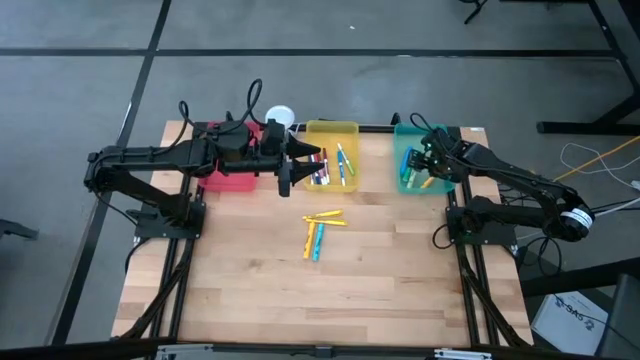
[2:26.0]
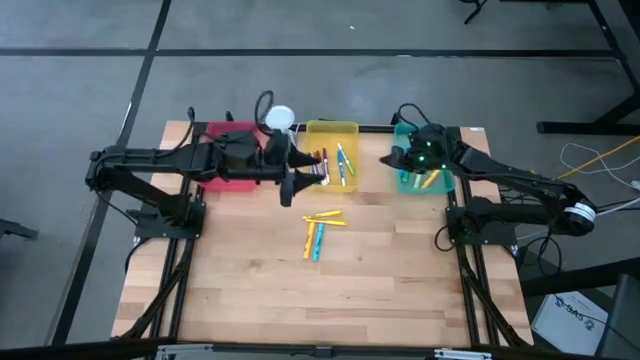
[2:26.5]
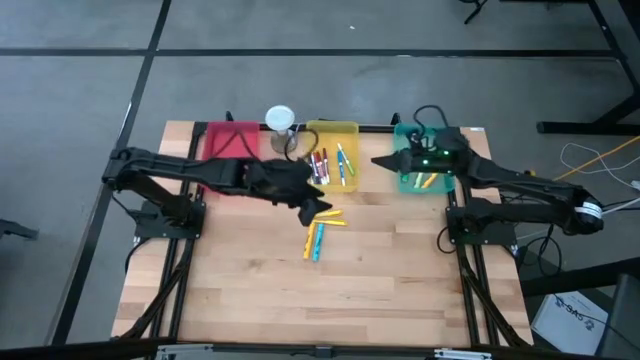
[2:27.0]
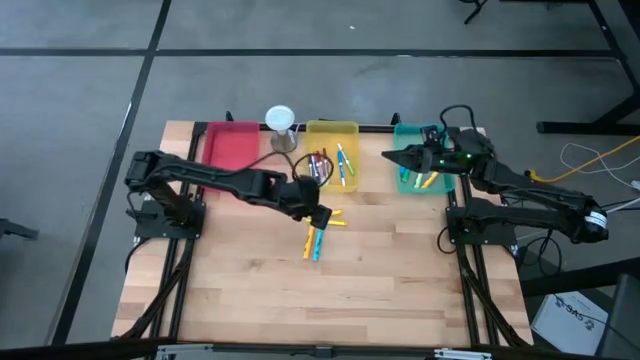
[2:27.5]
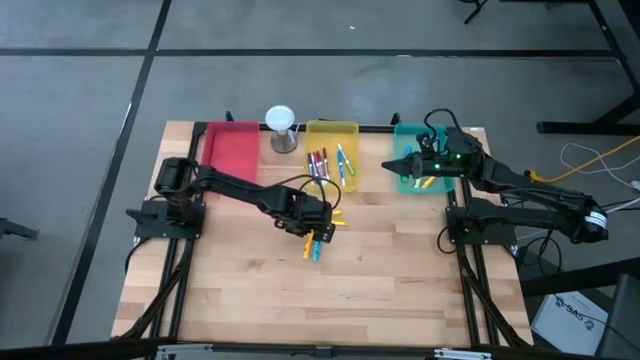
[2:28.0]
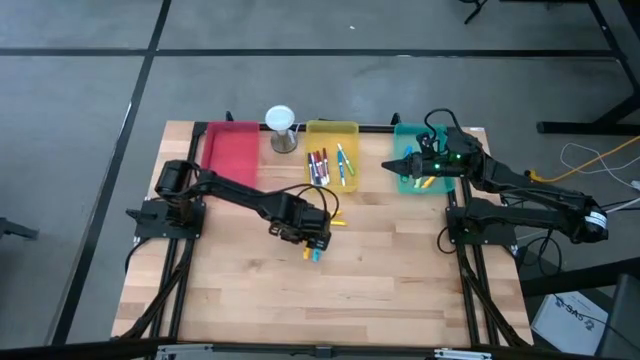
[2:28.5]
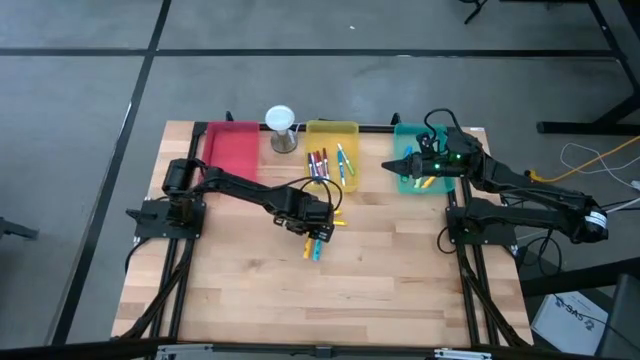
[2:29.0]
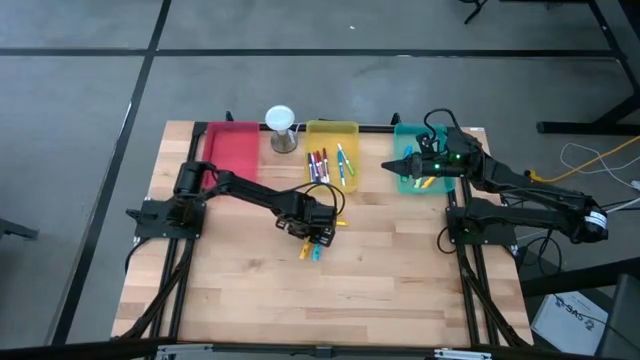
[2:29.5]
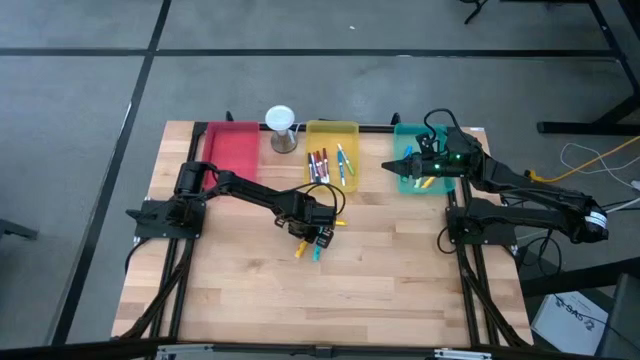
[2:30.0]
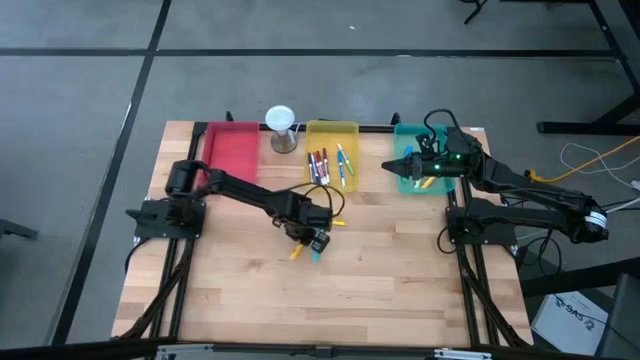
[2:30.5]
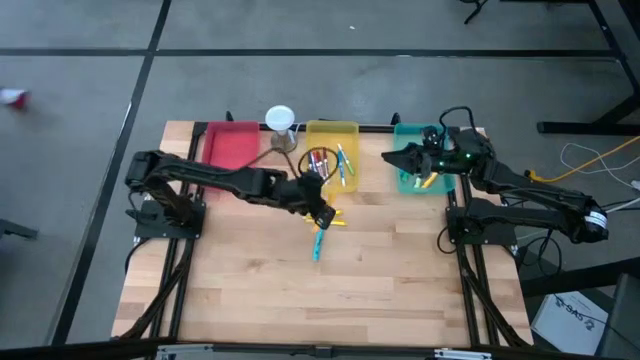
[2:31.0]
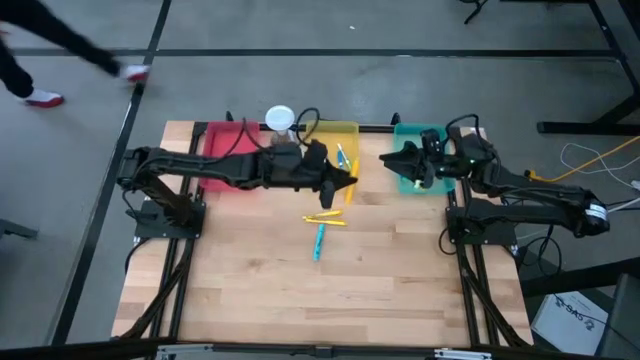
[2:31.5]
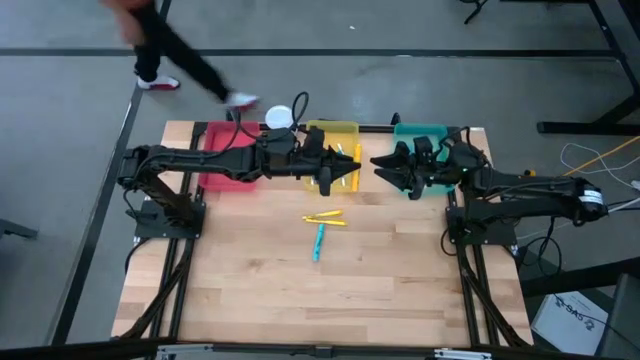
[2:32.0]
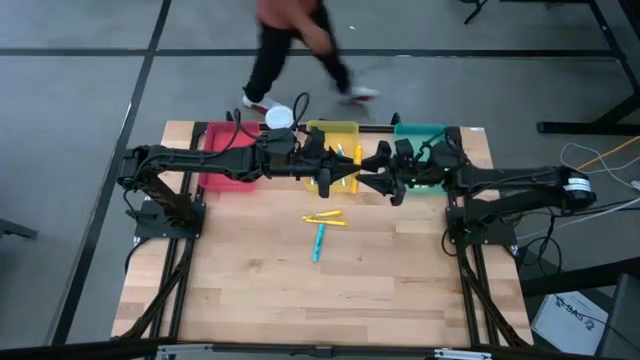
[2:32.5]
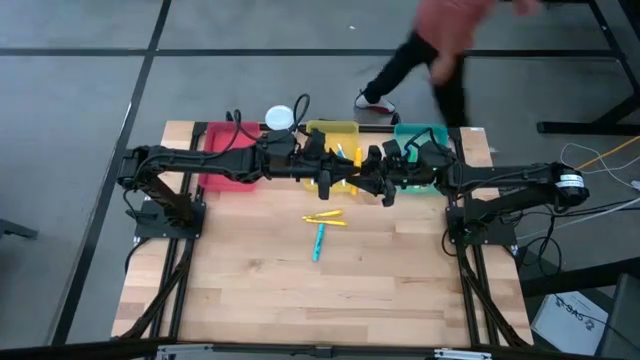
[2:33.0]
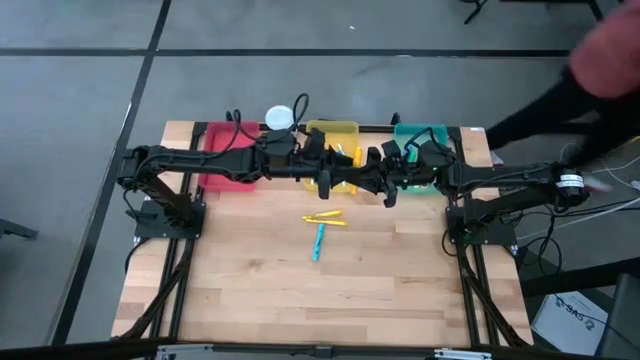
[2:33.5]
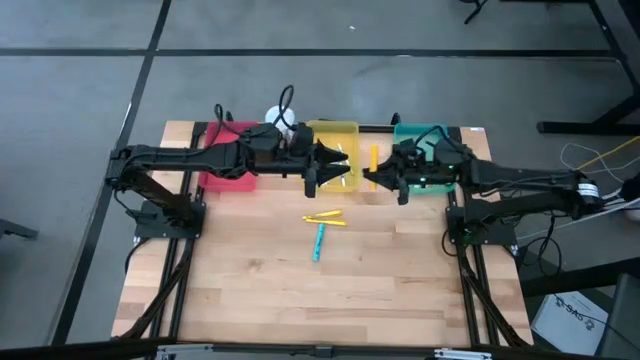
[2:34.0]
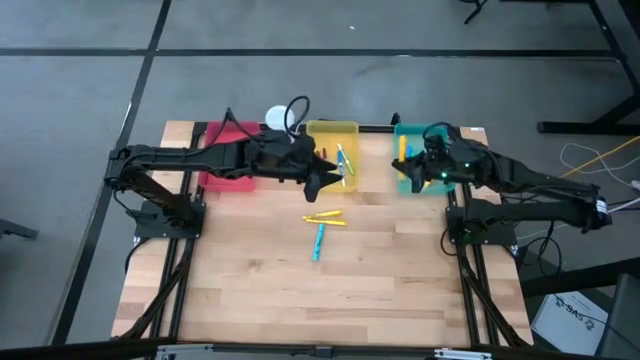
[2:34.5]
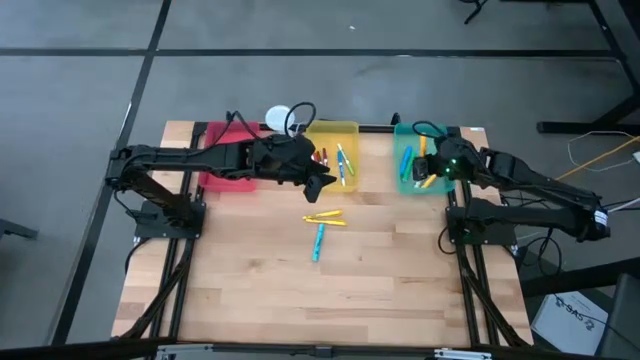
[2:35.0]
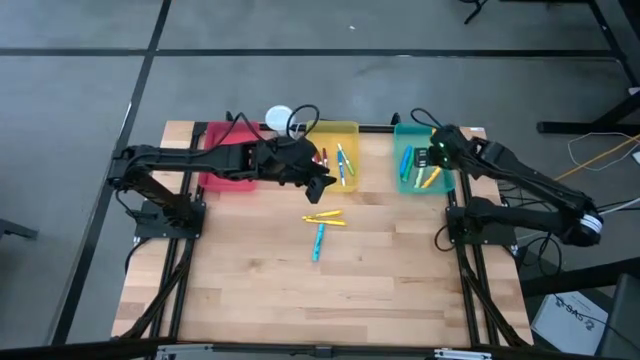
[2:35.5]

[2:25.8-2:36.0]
Task: Pick & Place Markers
Put the yellow highlighter into the blue bin

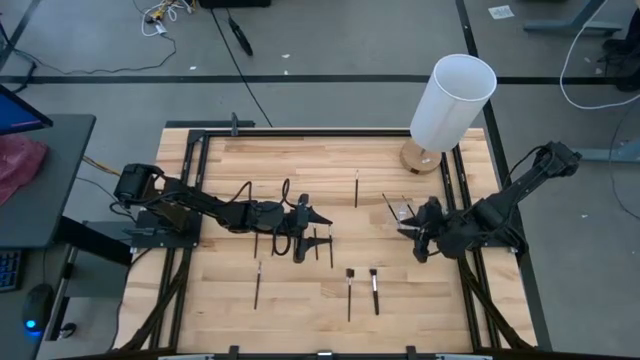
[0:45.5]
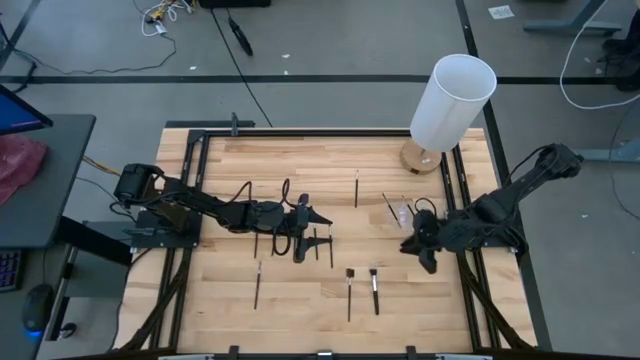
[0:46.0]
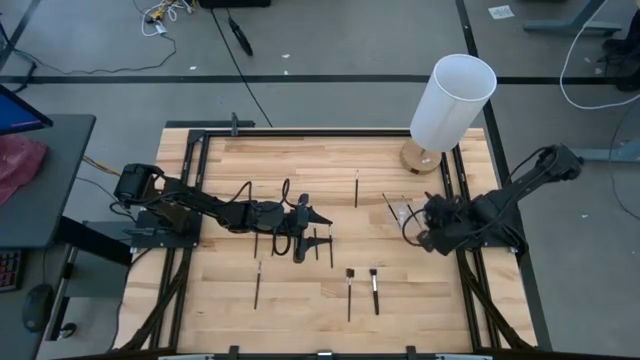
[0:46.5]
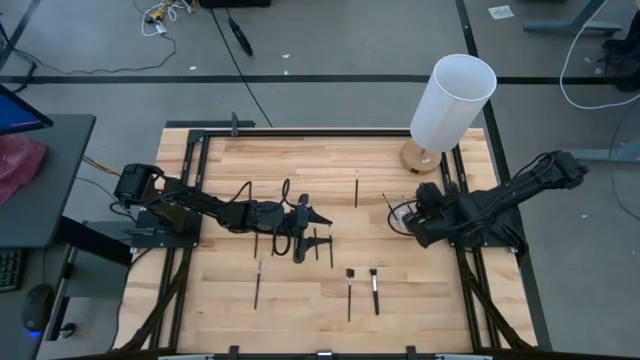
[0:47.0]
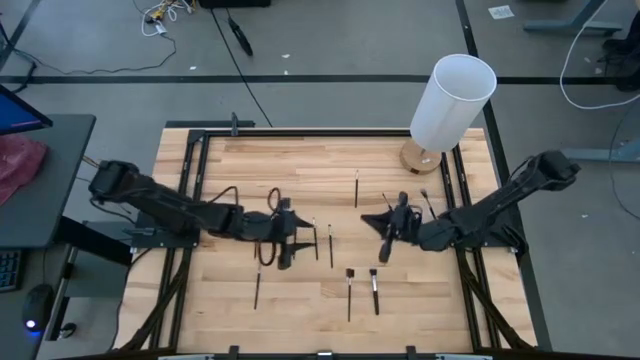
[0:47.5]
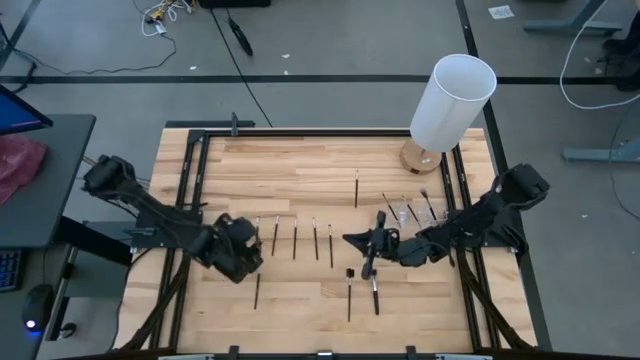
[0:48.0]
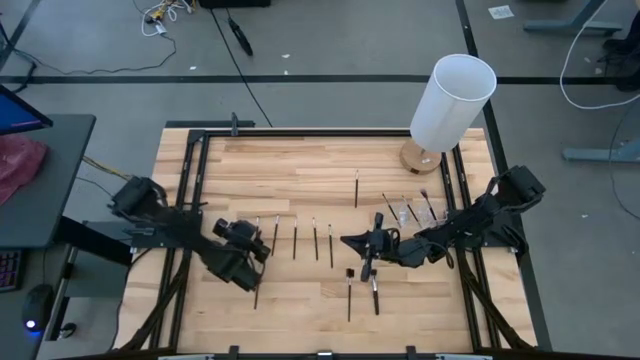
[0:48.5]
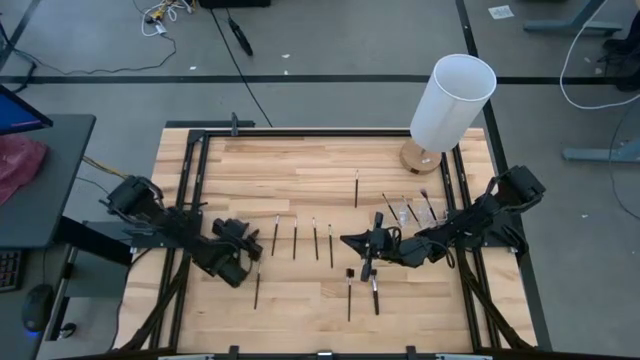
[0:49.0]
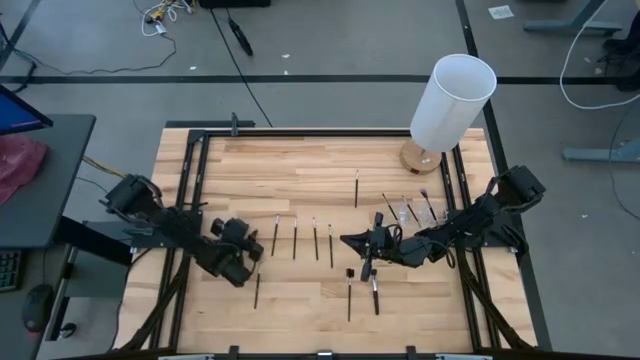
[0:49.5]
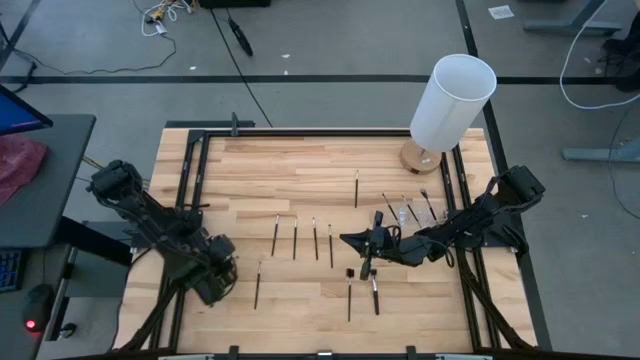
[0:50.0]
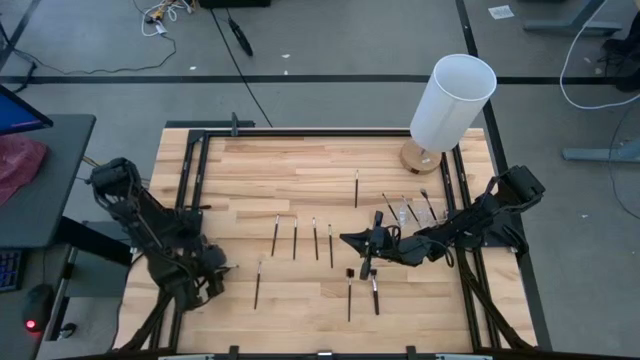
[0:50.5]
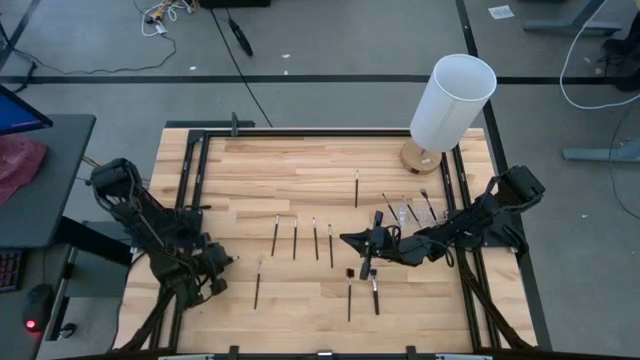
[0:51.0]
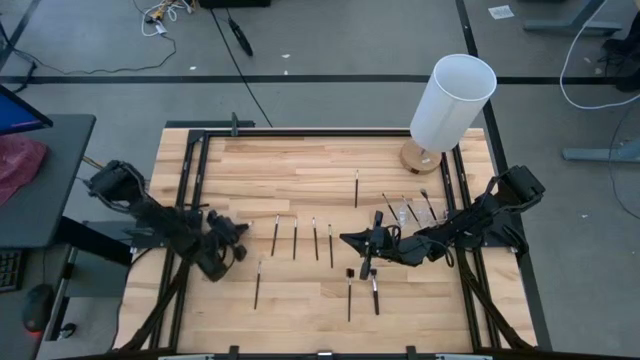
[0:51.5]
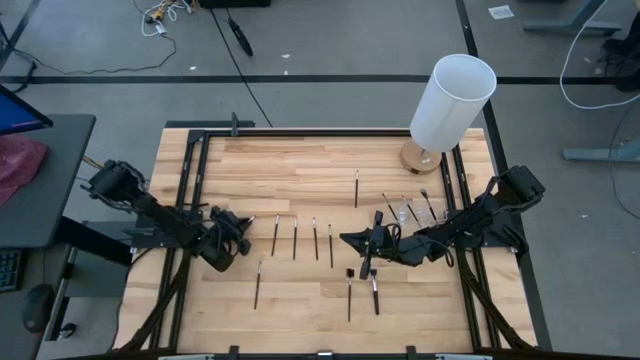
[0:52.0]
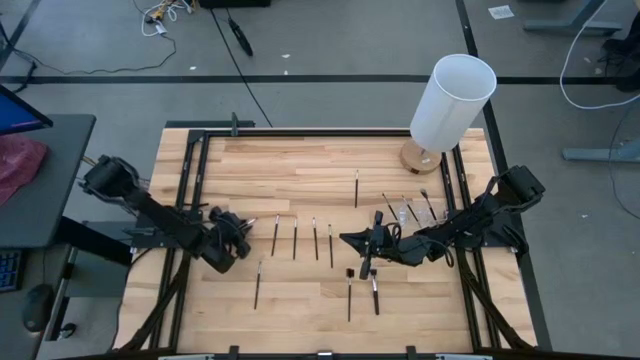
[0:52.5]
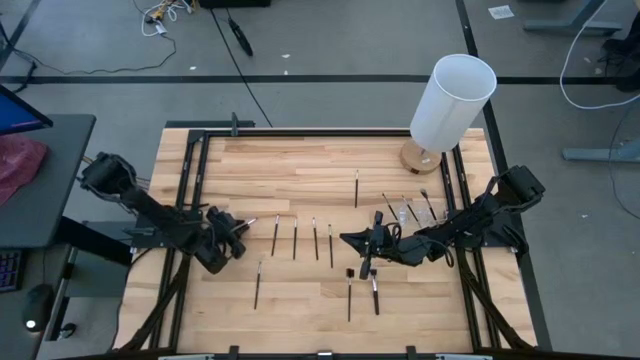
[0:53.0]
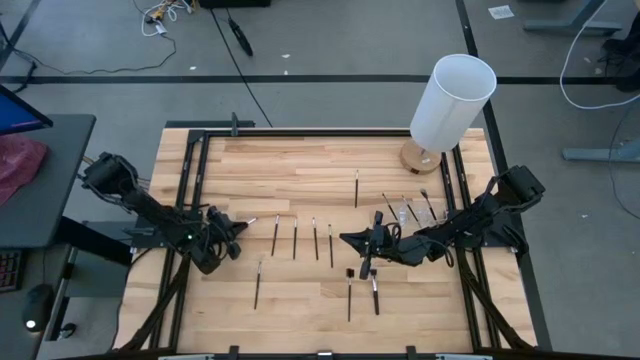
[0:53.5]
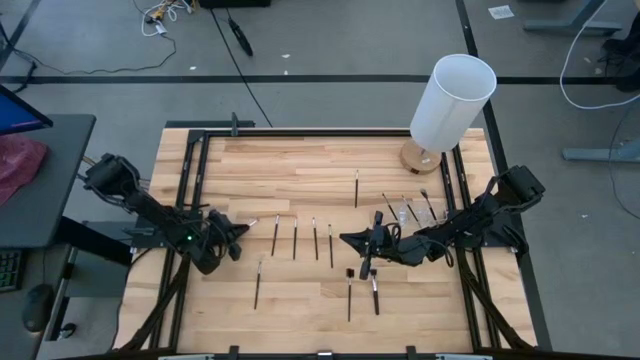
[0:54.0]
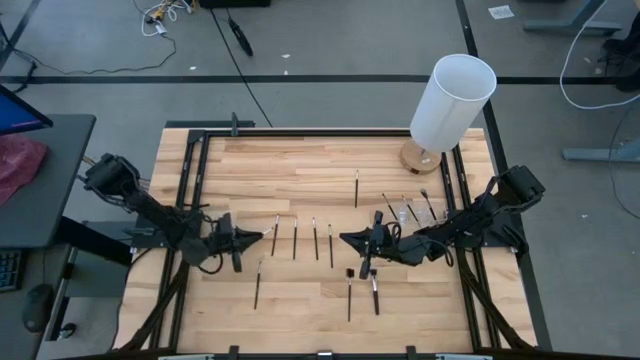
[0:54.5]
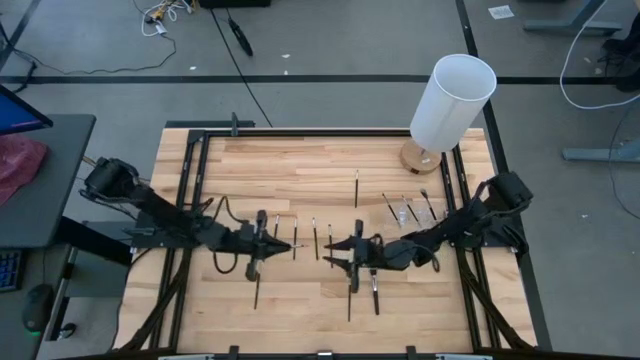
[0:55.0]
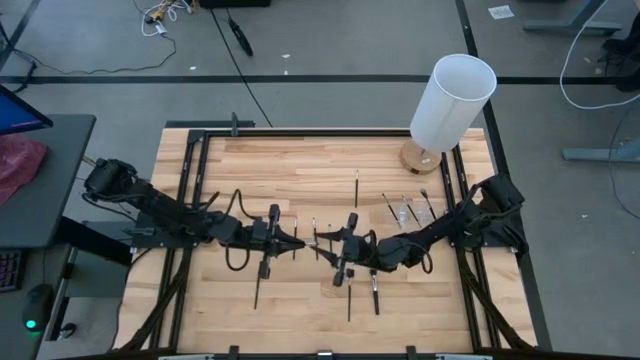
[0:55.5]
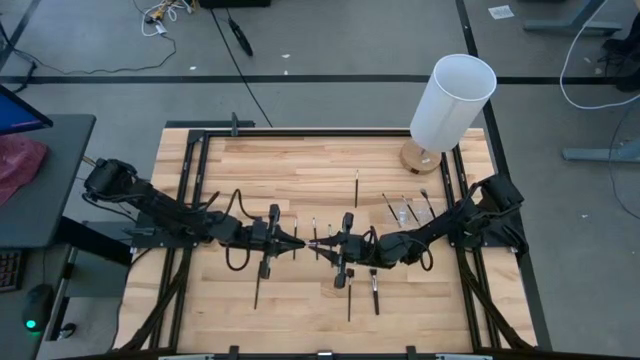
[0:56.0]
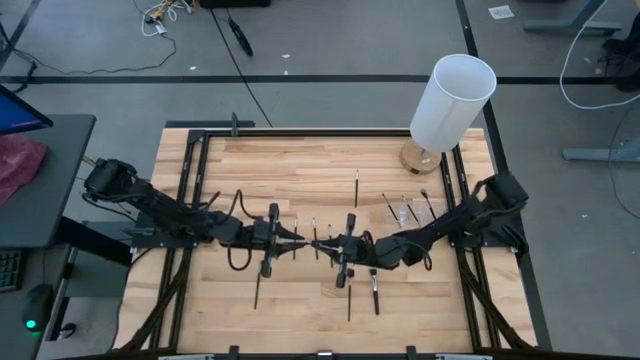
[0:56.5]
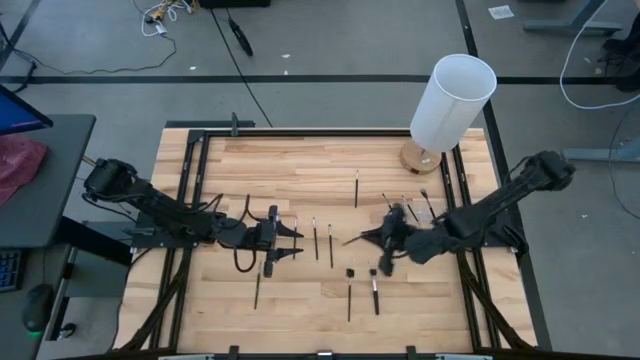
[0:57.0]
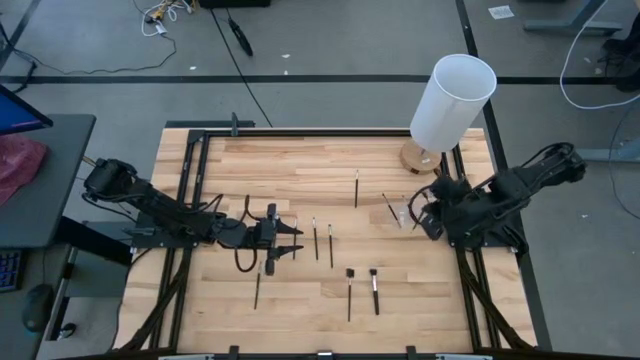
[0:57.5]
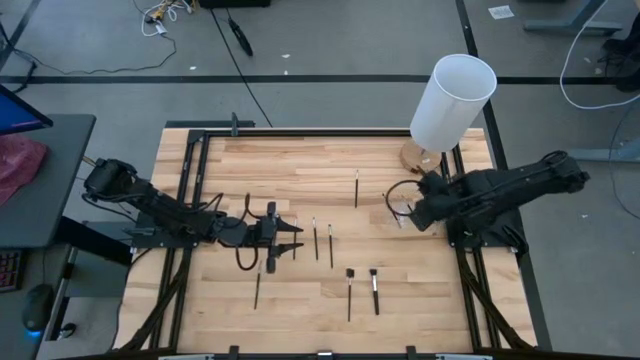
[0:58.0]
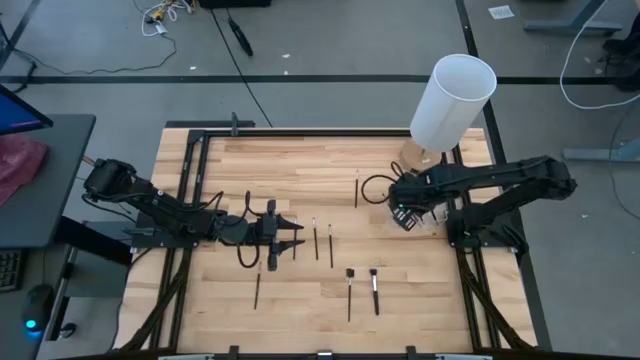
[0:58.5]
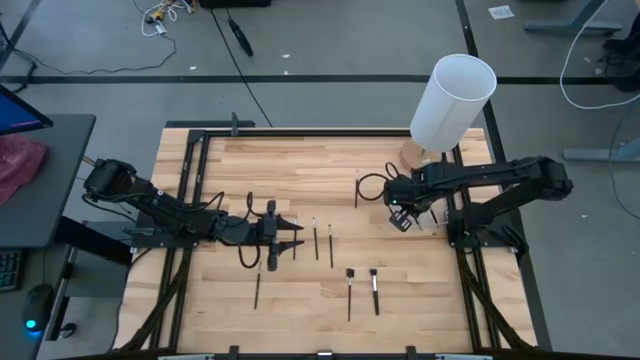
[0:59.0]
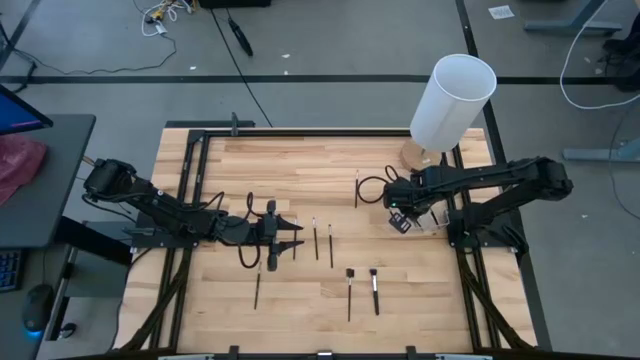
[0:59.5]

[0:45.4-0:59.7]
Task: Put items in baskets/containers
Put the black eyeshadow brush into the transparent organizer
